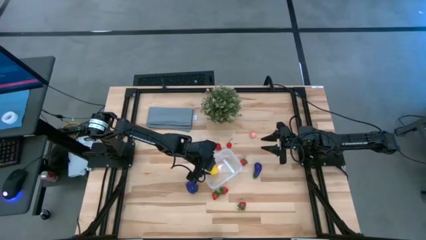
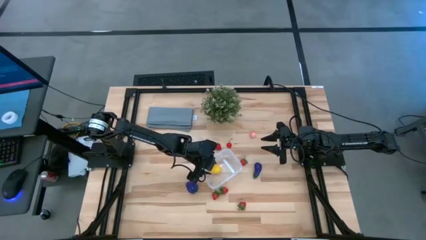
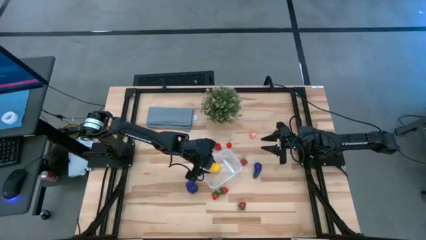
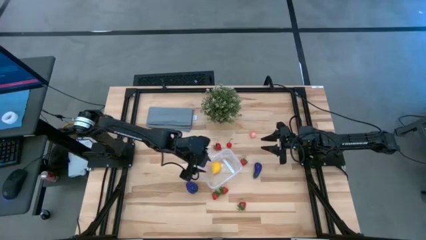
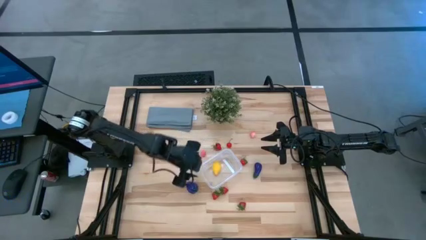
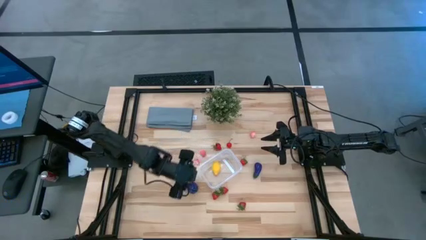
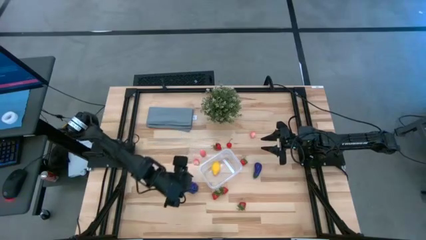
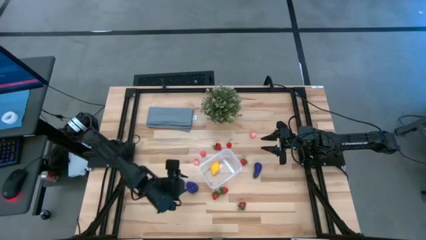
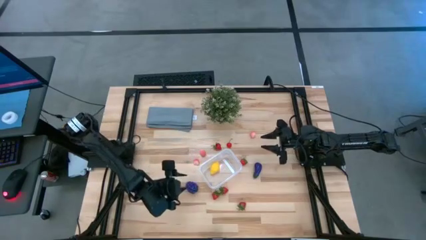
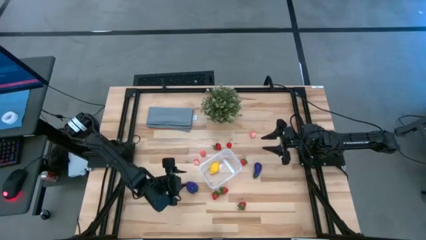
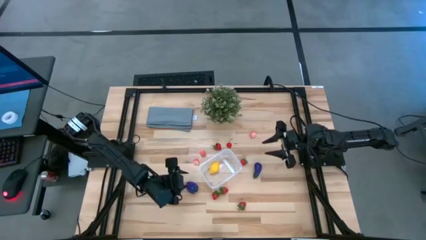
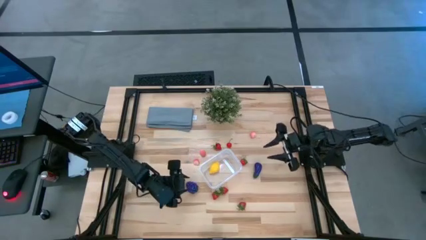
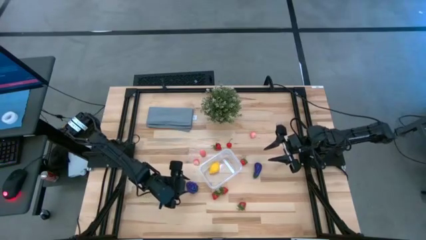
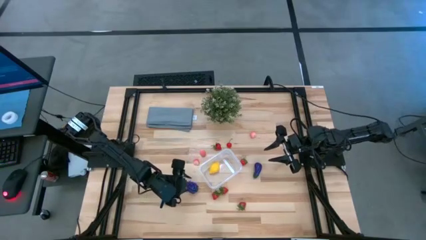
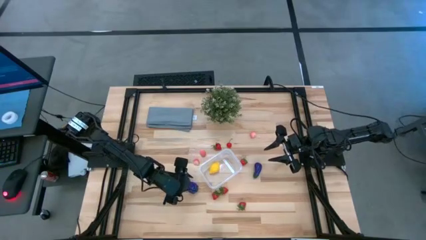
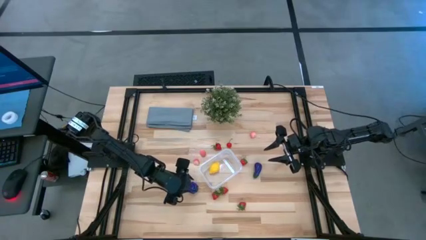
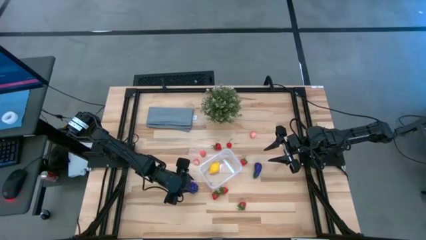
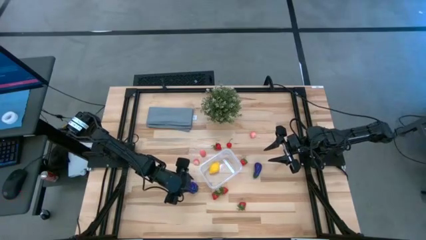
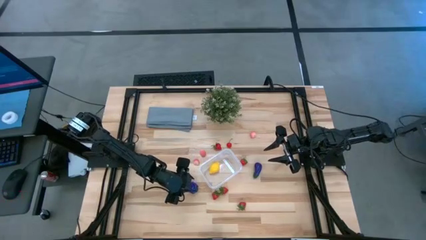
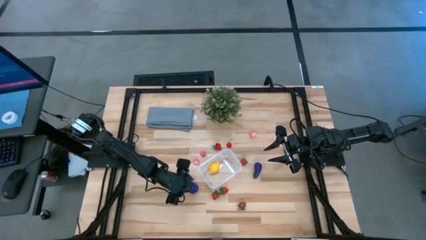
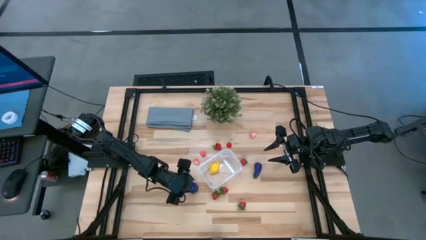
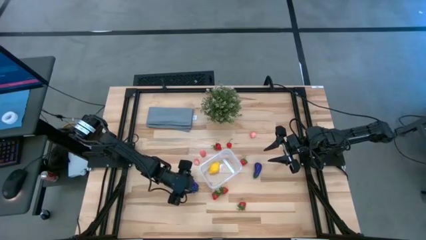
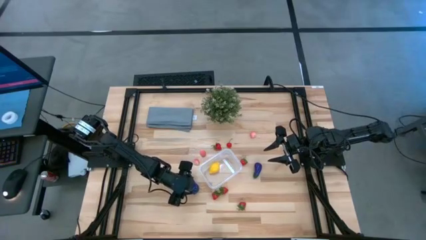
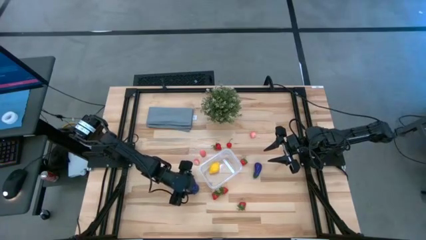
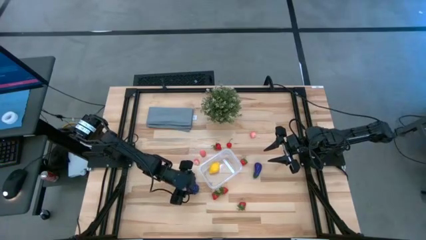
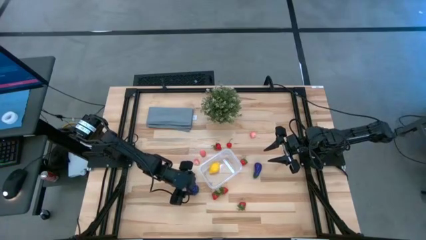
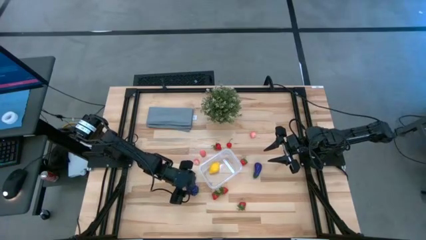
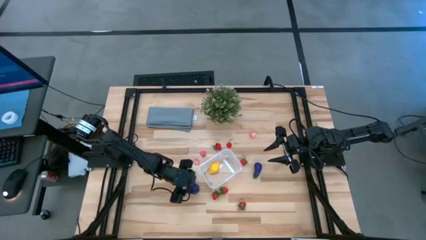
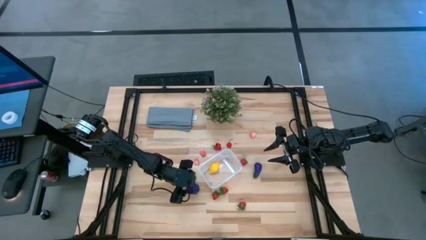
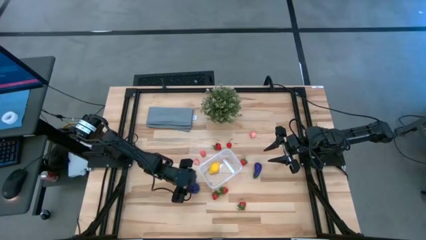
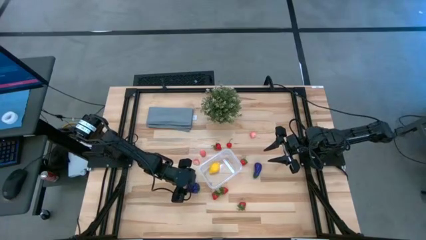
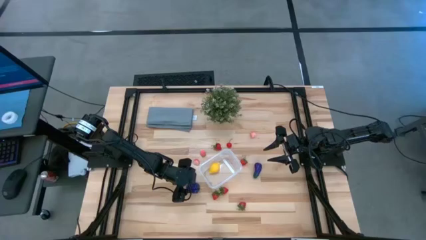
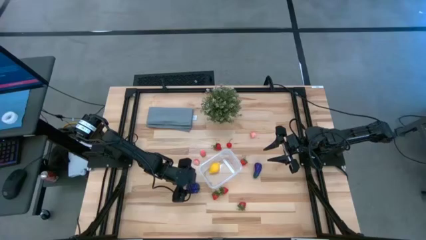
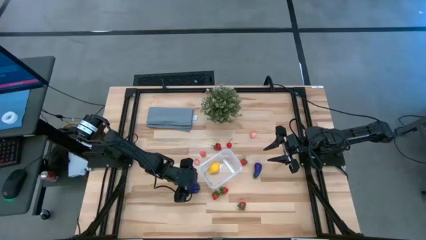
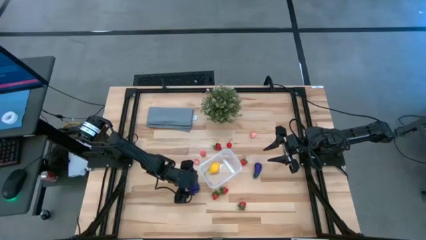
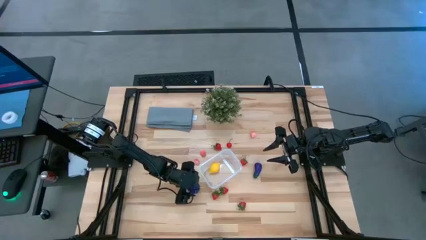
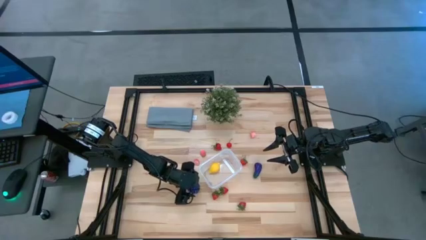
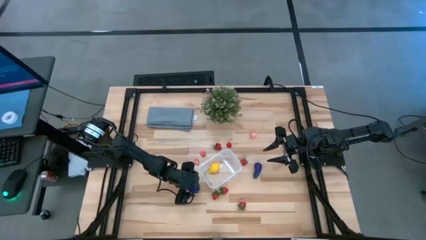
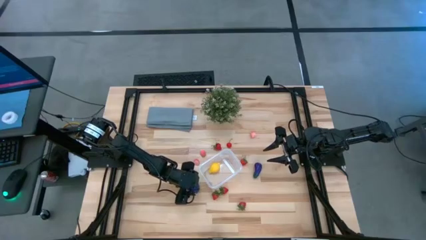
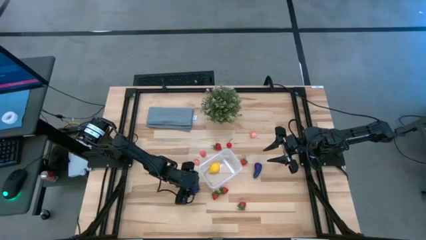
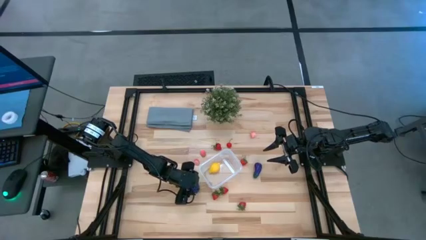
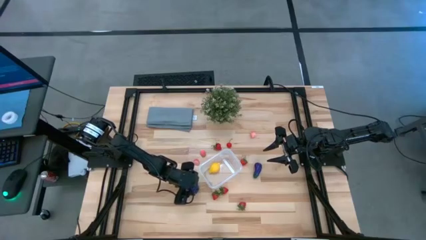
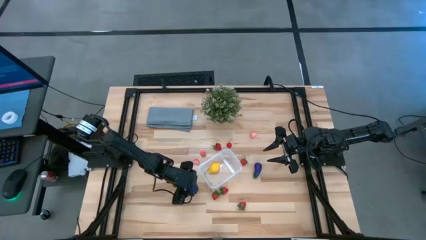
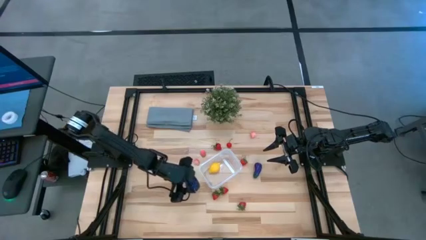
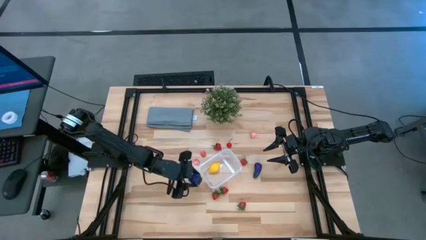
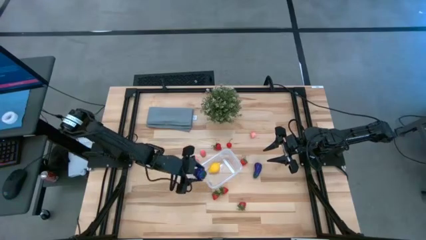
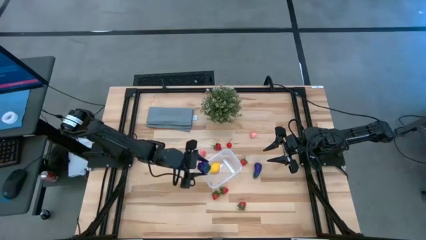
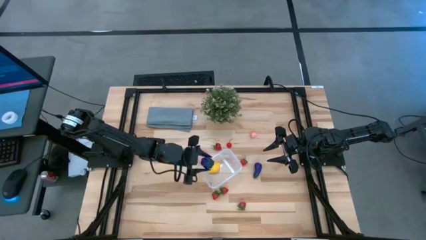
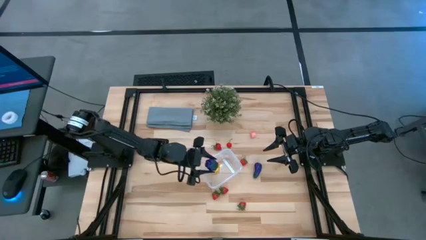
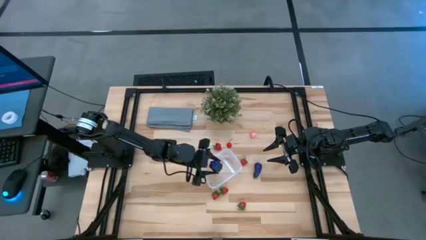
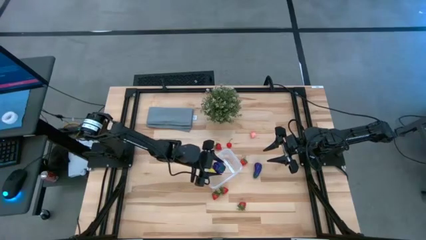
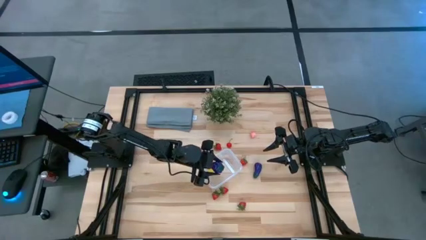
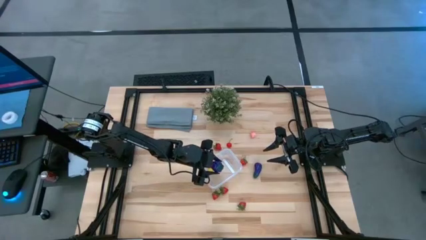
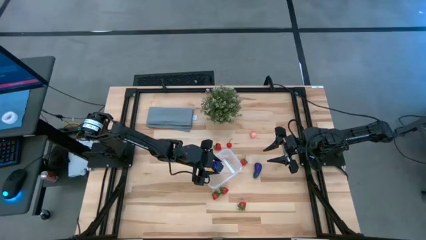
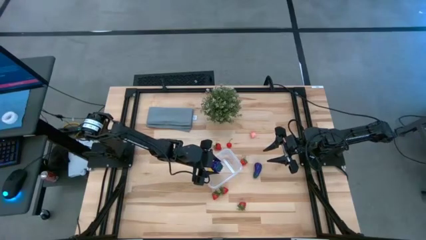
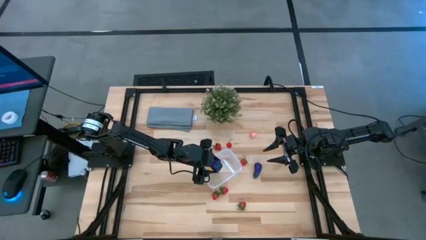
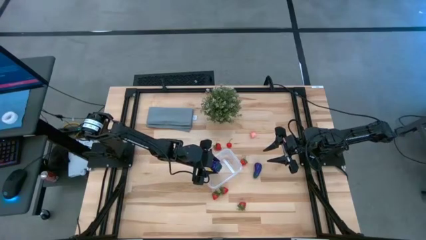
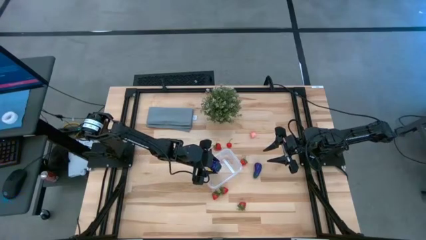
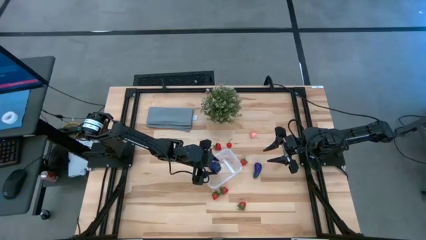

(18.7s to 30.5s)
Task: Pick and placing Produce into tupperware
Put the grapes into the transparent bin
